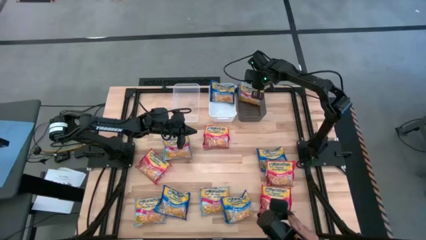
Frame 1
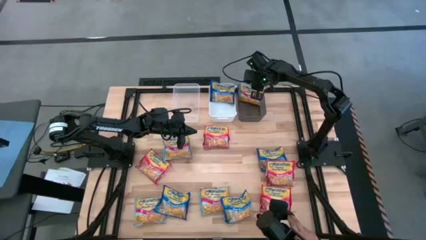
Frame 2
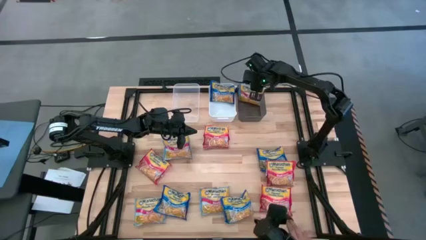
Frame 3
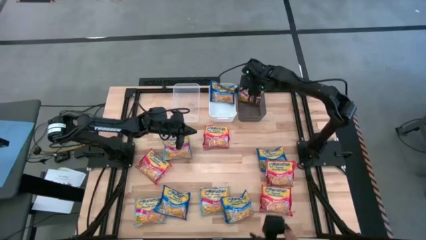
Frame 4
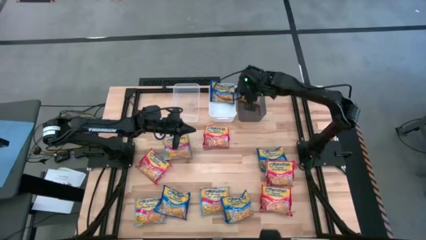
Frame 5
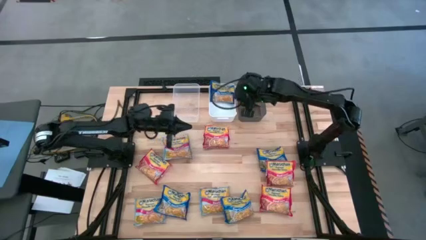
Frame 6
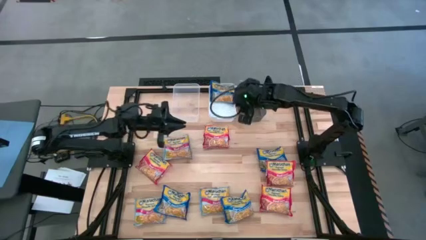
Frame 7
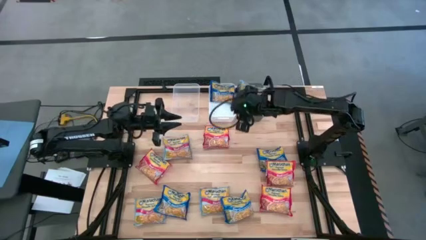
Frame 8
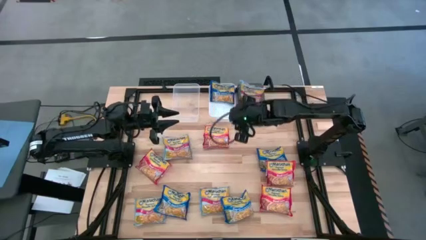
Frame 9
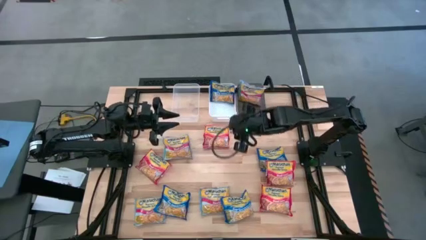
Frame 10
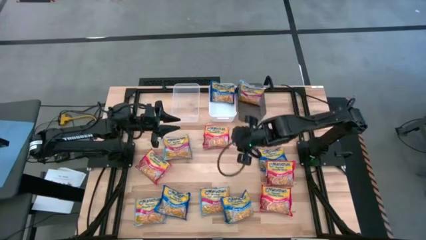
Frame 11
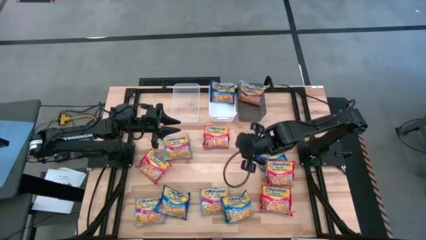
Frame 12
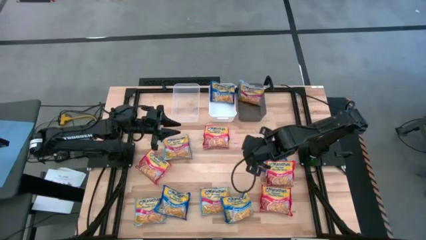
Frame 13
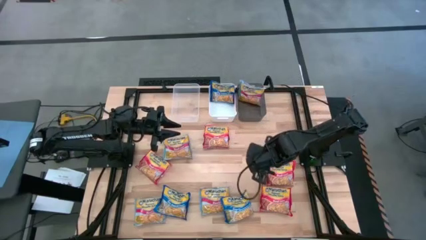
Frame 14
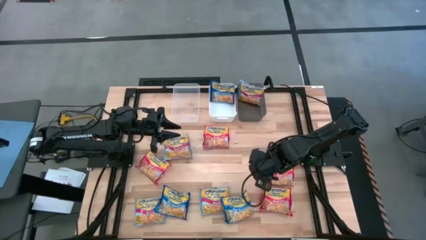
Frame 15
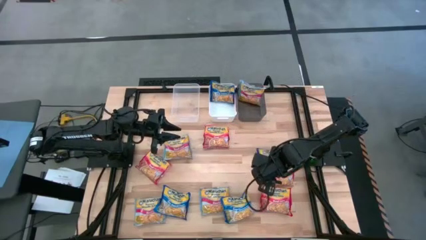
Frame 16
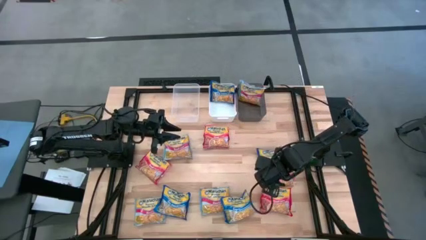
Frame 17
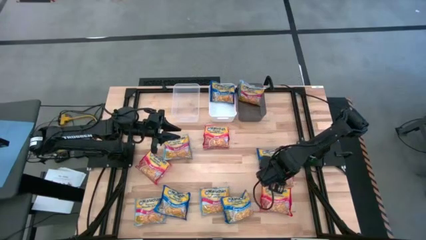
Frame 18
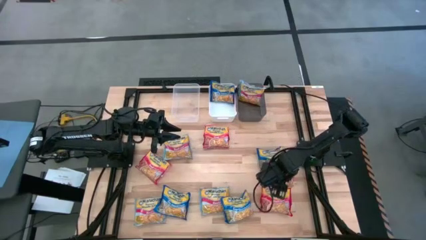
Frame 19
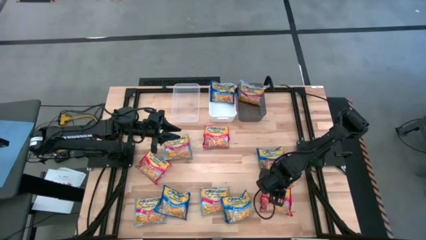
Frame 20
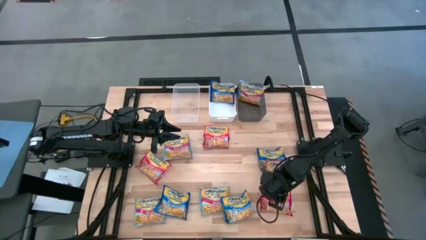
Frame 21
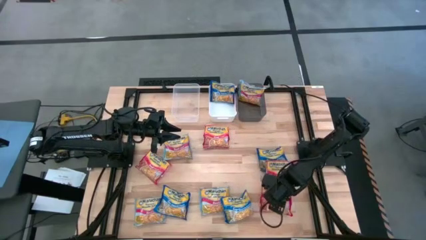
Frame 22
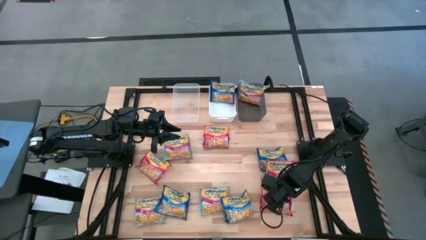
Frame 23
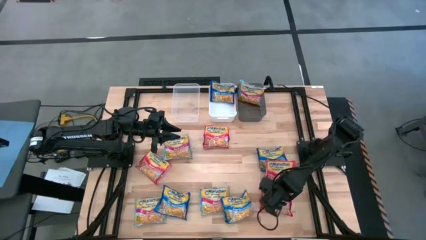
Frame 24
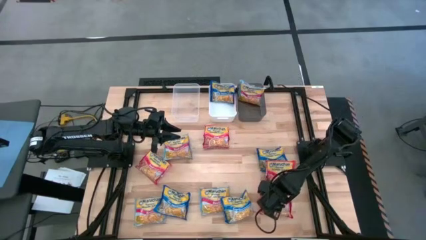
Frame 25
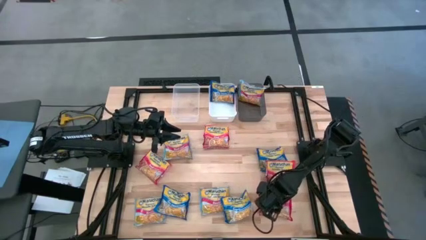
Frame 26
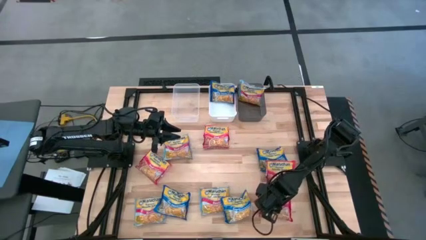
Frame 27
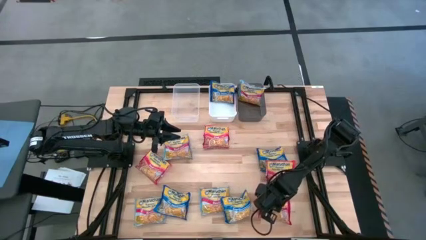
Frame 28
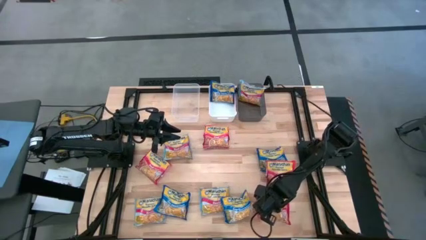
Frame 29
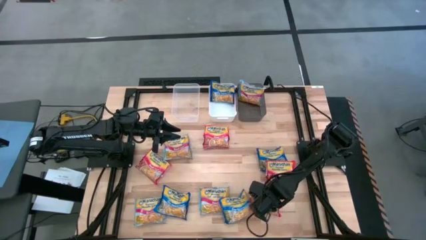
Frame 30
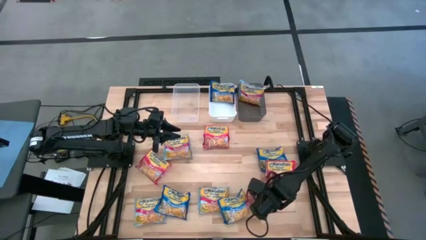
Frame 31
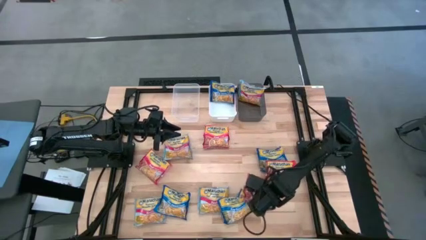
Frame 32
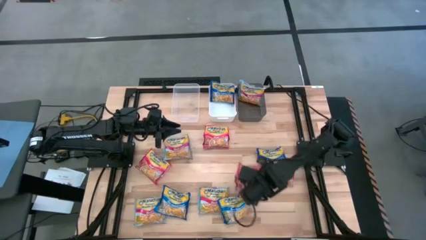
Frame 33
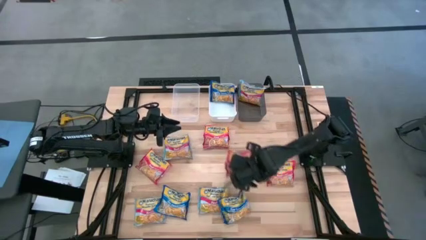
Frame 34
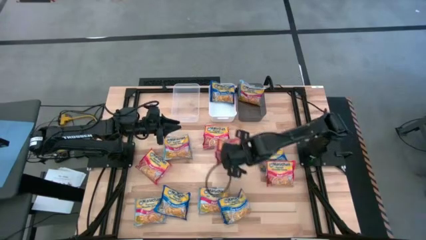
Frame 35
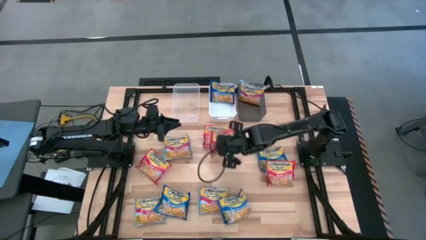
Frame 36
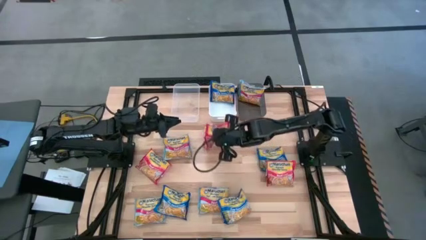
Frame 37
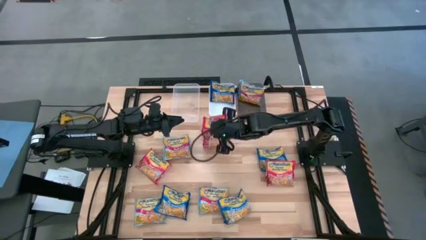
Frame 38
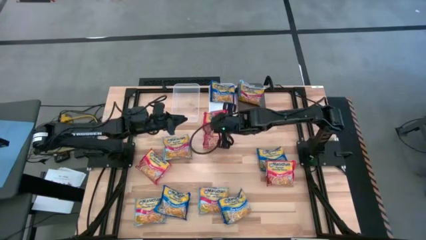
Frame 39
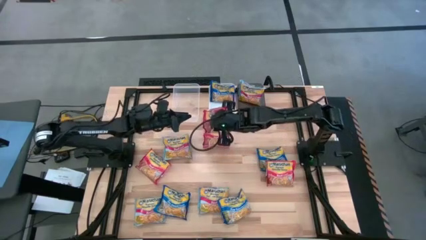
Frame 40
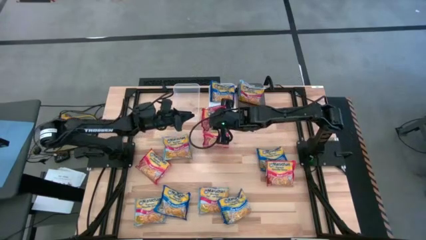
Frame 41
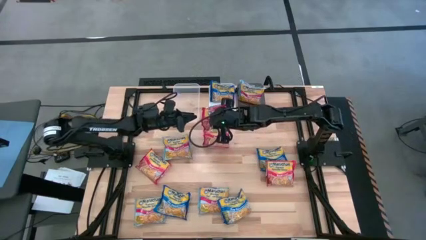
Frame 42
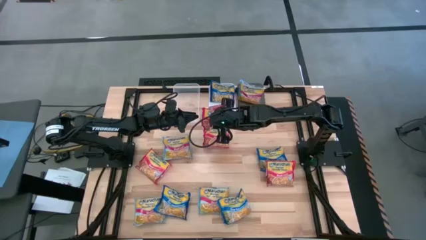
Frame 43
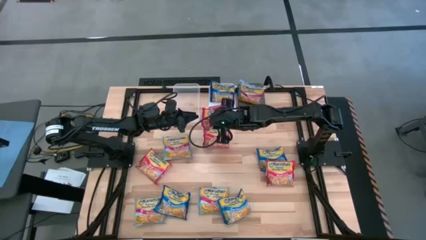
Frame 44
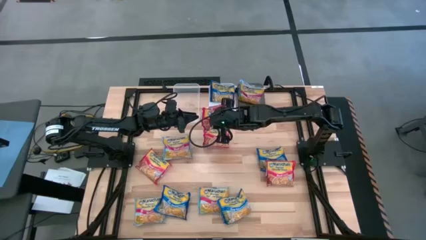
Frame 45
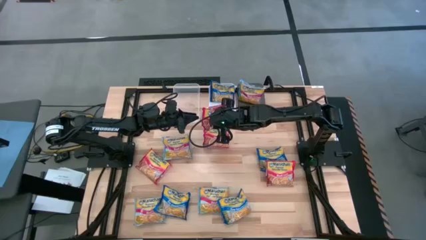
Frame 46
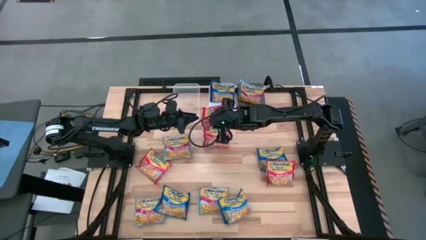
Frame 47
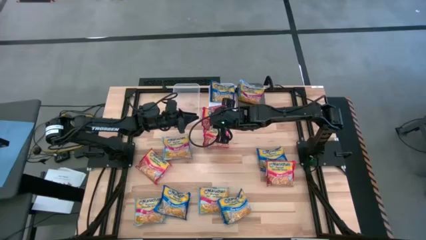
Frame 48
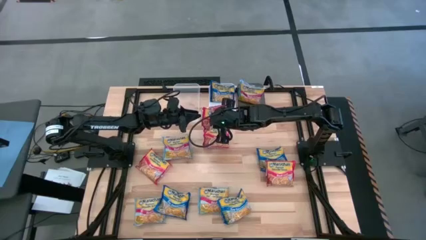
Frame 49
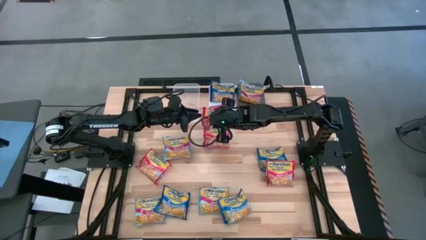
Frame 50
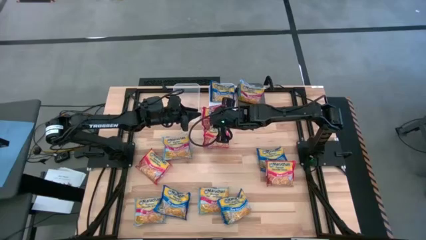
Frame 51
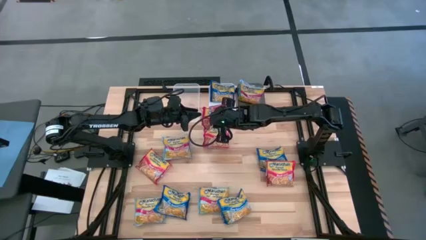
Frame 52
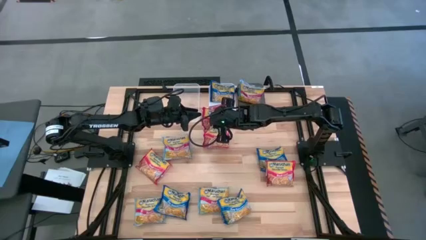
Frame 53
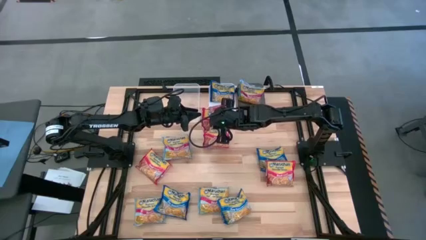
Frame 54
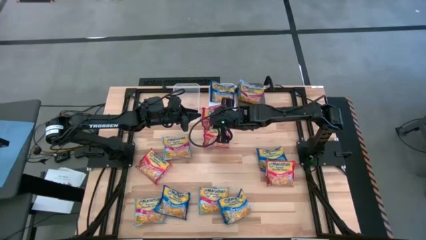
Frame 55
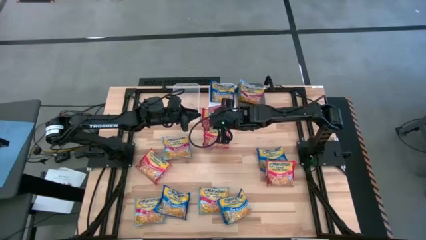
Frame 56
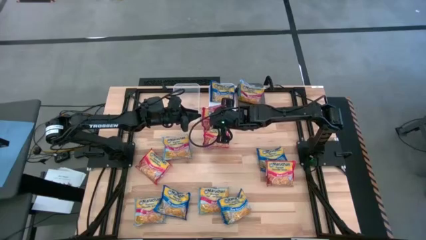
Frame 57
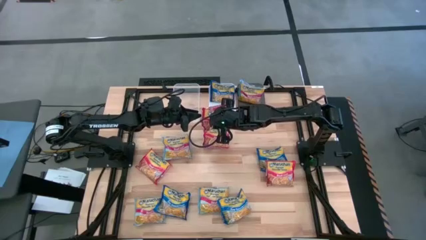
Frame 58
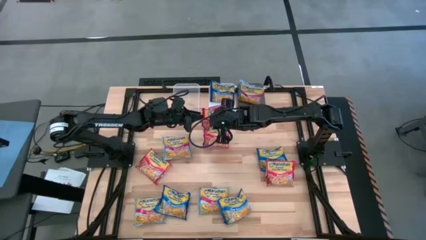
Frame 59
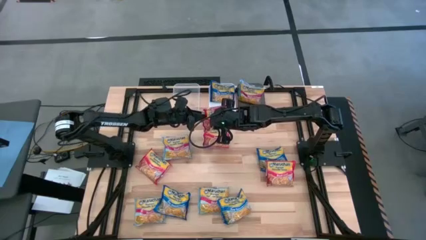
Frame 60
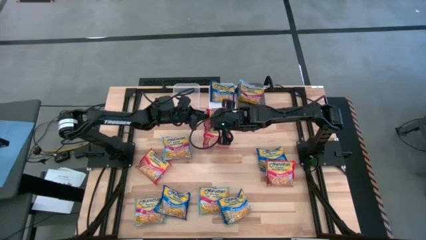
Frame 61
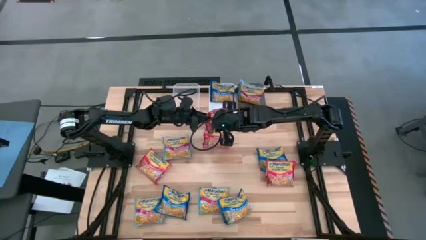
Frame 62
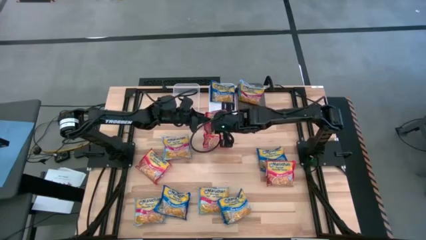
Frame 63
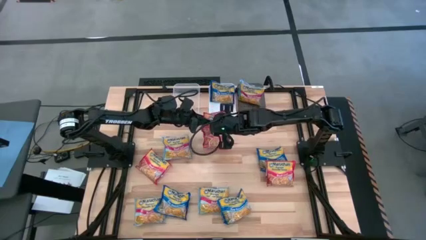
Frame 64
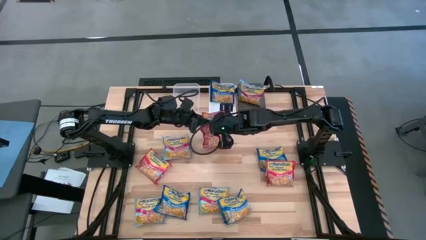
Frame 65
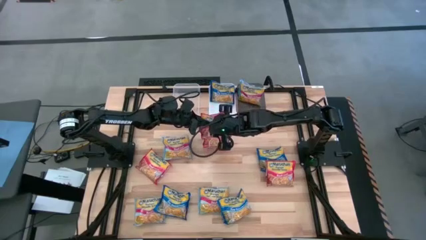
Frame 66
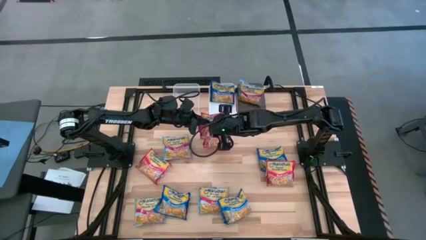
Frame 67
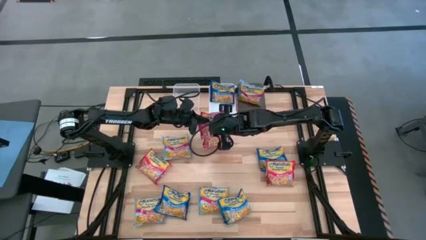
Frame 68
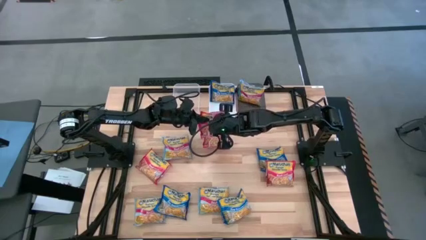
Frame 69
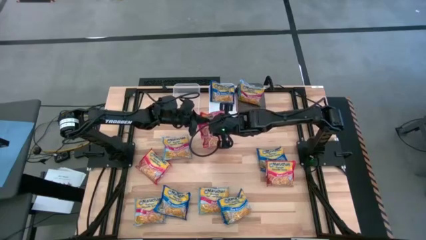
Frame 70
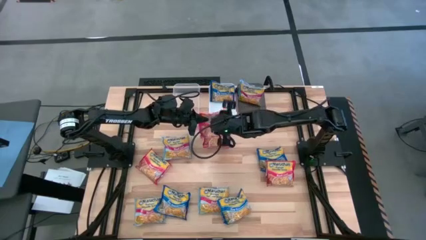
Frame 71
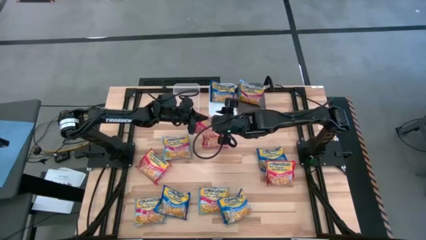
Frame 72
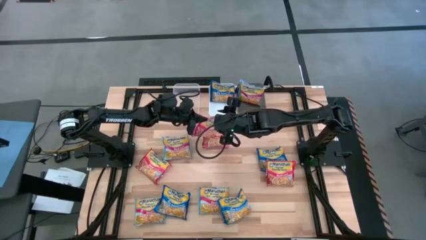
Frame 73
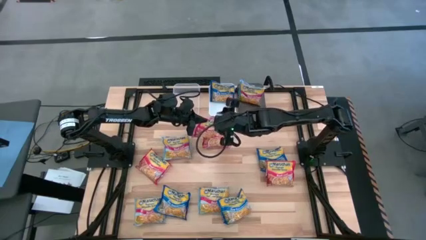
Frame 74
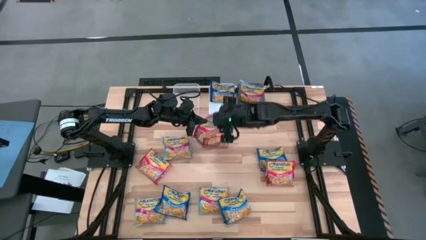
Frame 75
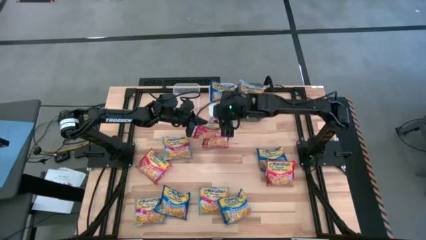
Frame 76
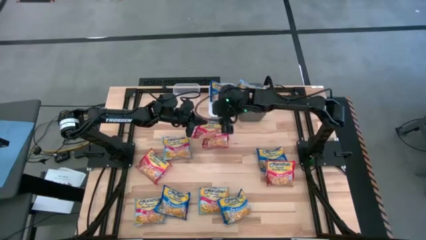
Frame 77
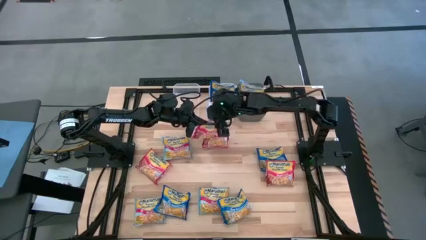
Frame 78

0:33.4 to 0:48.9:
Task: Sort Maruchan noodles
Put the red noodle pack into the transparent bin

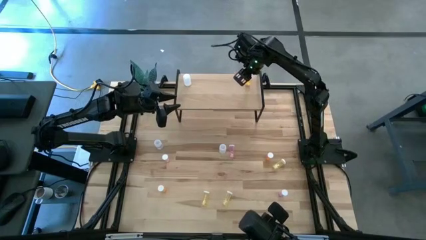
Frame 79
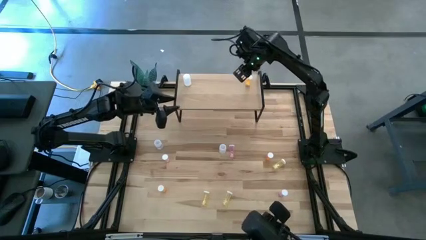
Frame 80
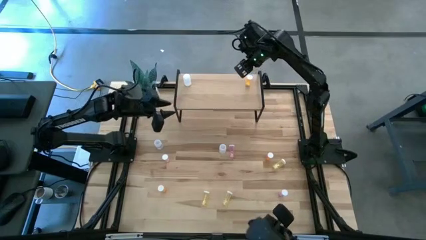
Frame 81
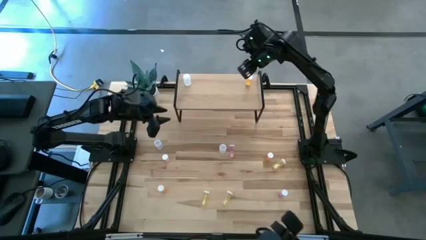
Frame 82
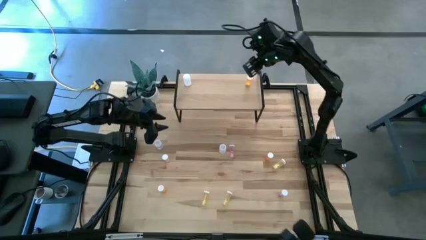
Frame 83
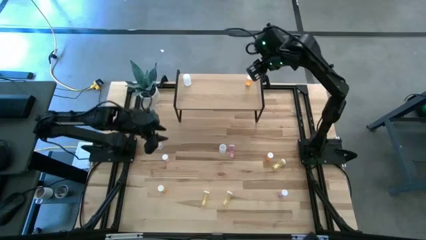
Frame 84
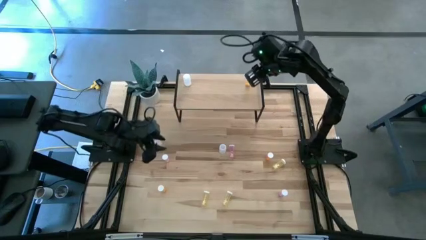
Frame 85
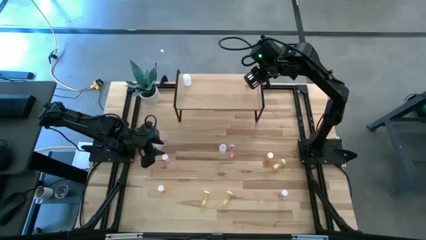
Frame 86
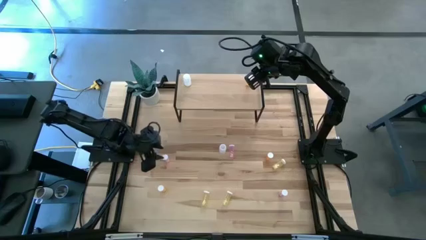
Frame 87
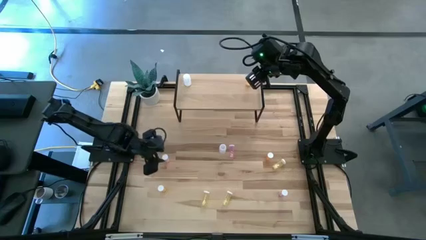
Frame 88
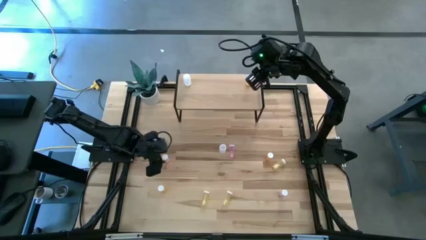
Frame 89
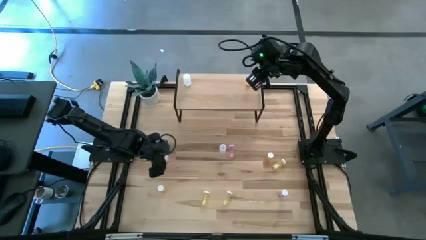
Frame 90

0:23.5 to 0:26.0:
Task: Pick and place medicine bottles onto shelf by color
Put the left pink pill bottle on the shelf
